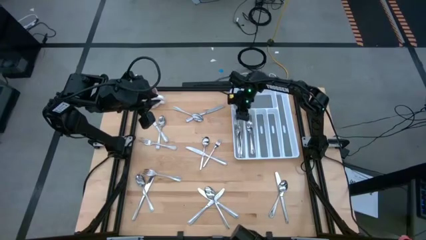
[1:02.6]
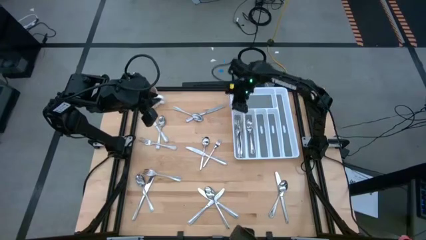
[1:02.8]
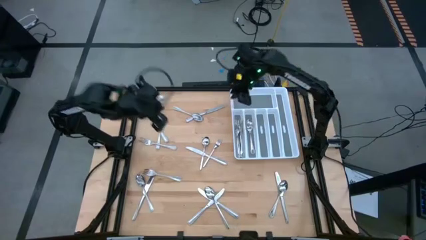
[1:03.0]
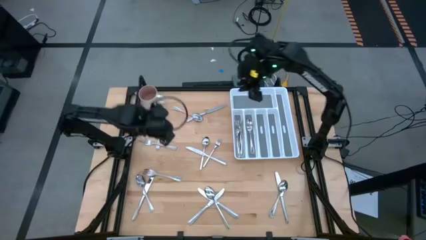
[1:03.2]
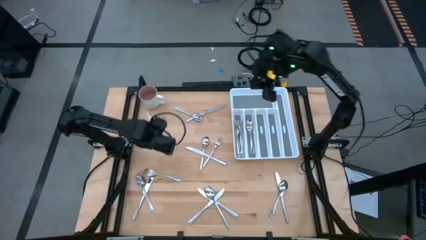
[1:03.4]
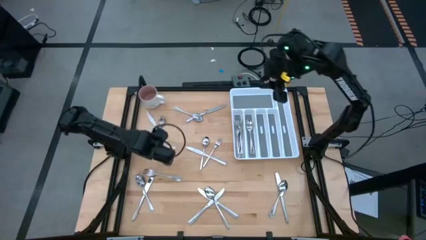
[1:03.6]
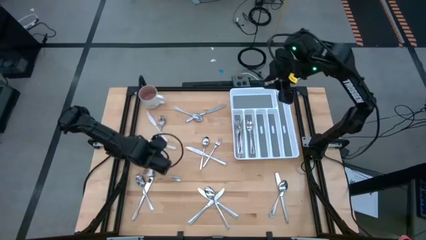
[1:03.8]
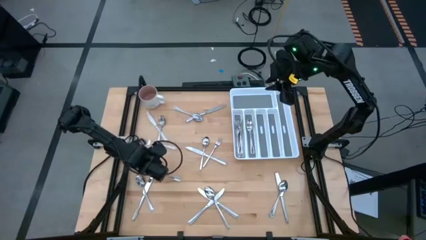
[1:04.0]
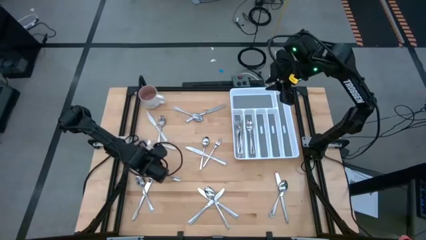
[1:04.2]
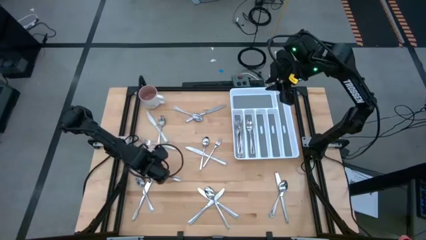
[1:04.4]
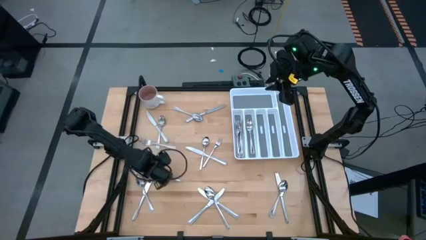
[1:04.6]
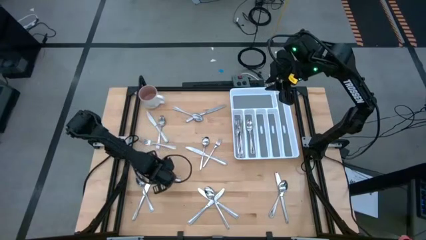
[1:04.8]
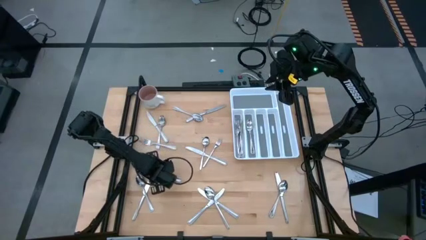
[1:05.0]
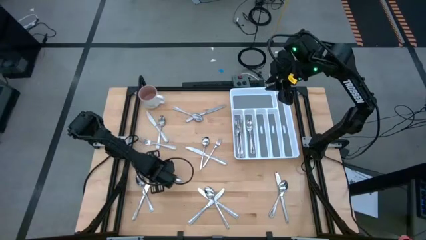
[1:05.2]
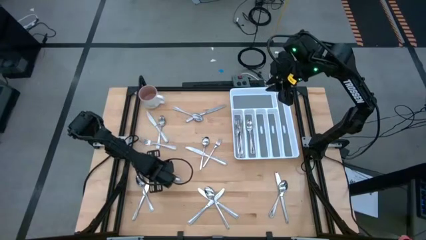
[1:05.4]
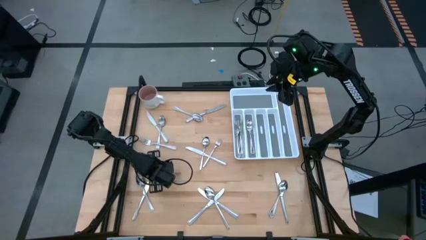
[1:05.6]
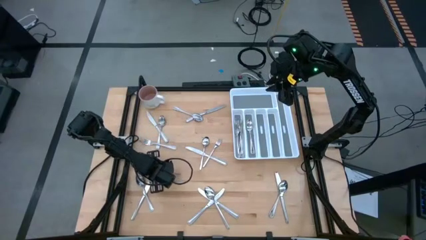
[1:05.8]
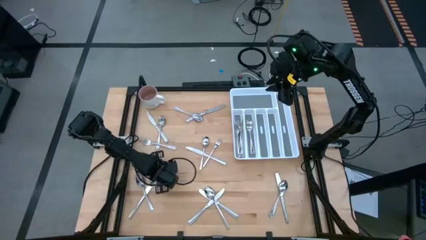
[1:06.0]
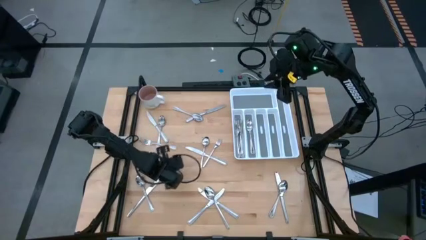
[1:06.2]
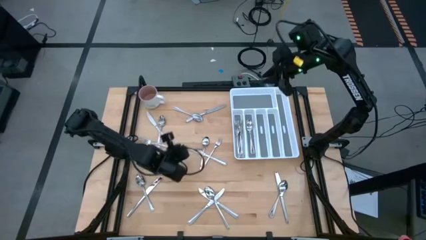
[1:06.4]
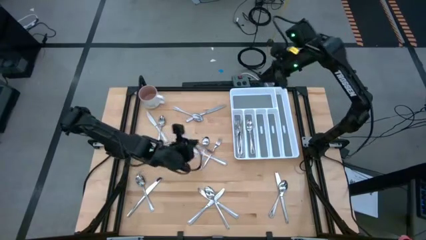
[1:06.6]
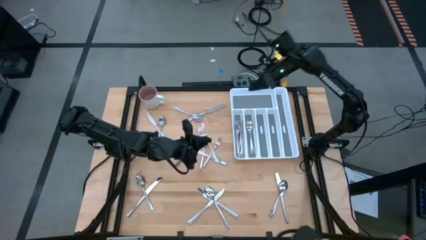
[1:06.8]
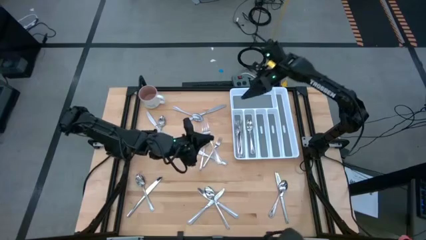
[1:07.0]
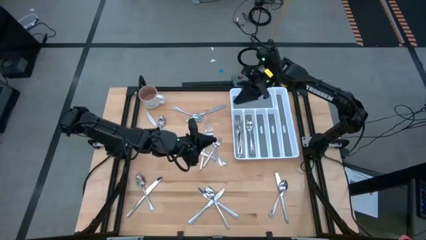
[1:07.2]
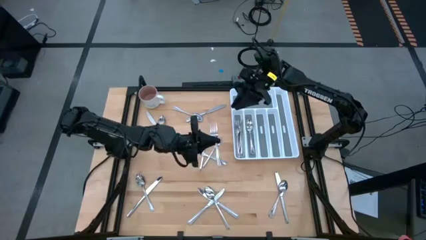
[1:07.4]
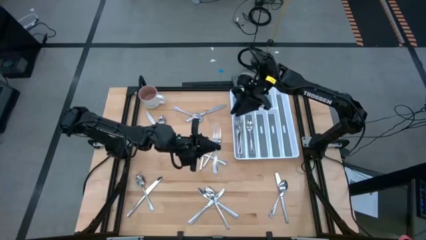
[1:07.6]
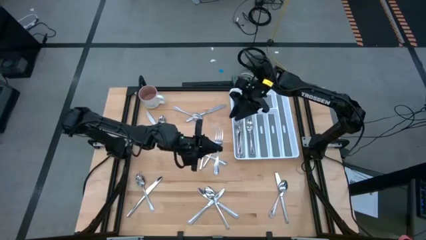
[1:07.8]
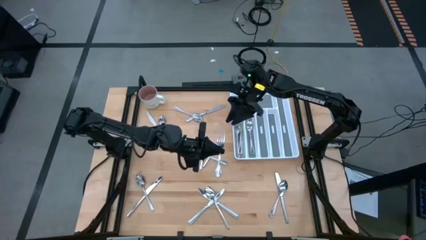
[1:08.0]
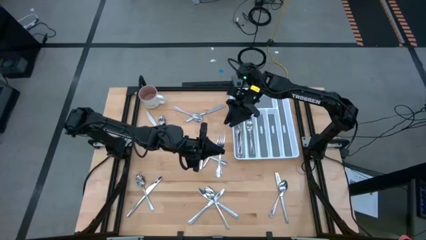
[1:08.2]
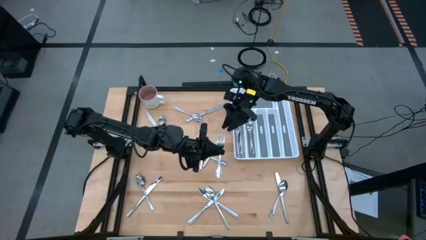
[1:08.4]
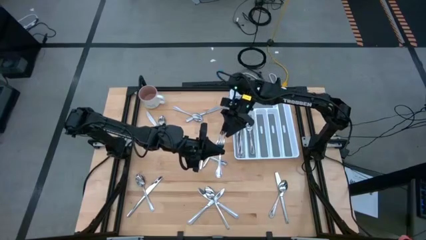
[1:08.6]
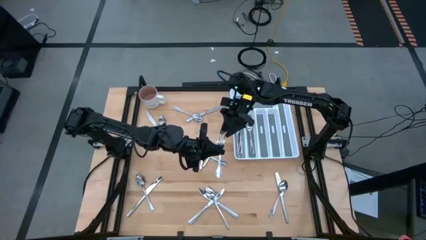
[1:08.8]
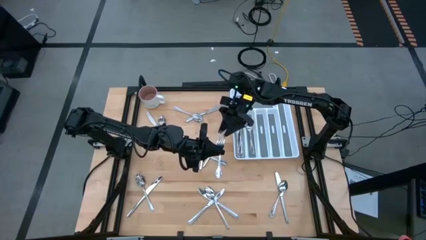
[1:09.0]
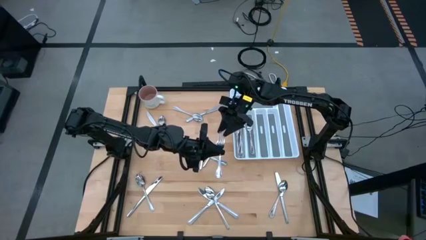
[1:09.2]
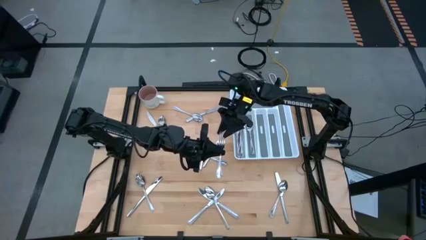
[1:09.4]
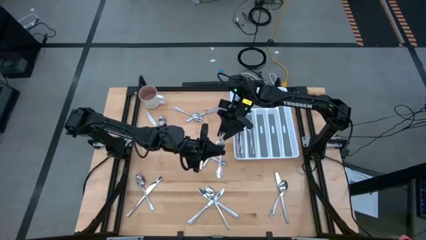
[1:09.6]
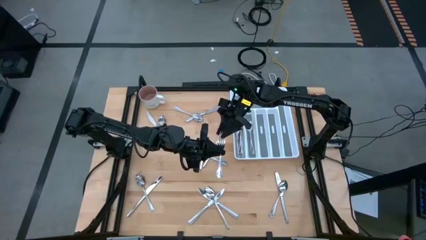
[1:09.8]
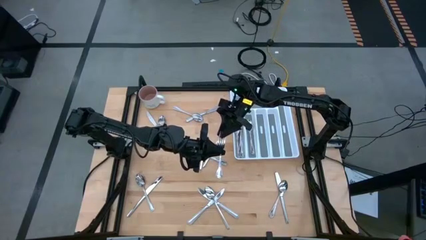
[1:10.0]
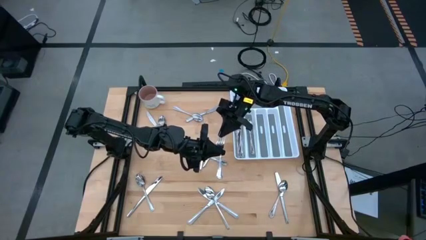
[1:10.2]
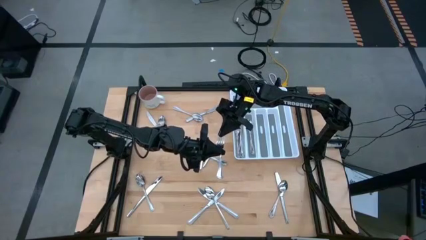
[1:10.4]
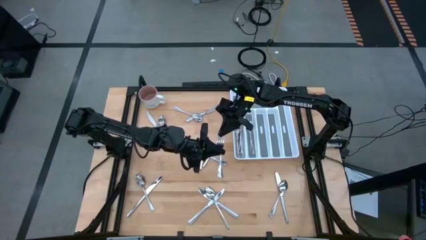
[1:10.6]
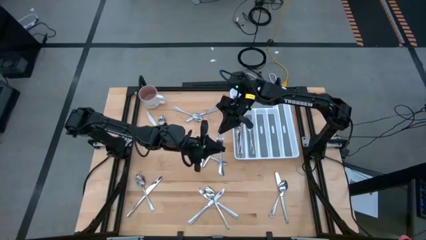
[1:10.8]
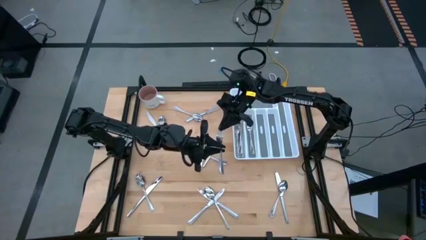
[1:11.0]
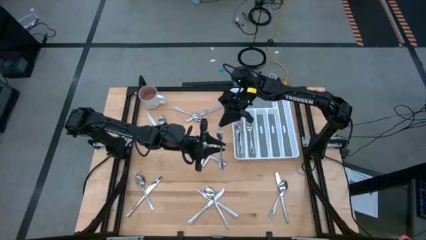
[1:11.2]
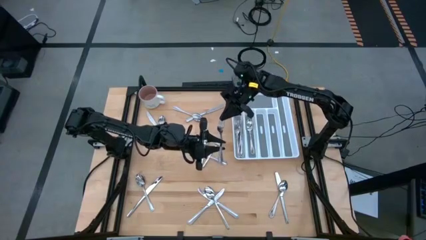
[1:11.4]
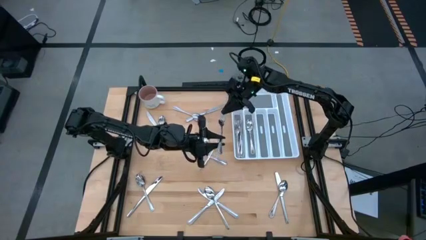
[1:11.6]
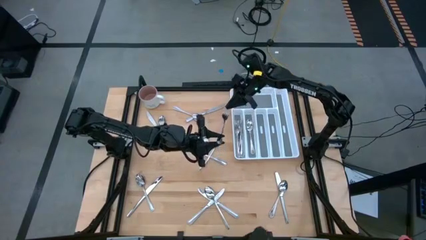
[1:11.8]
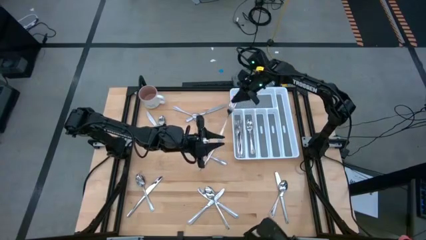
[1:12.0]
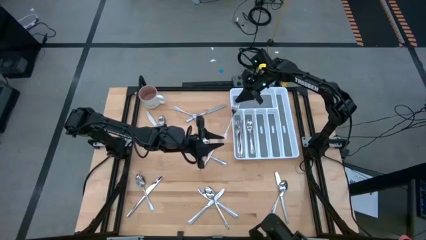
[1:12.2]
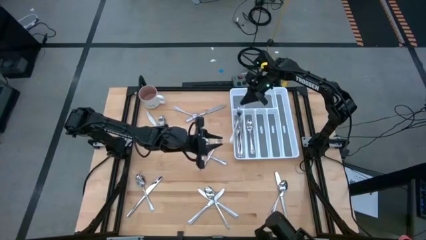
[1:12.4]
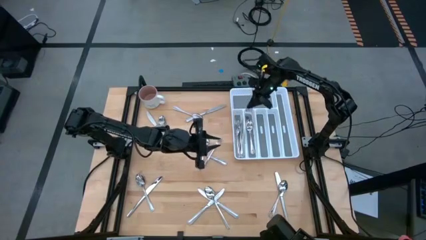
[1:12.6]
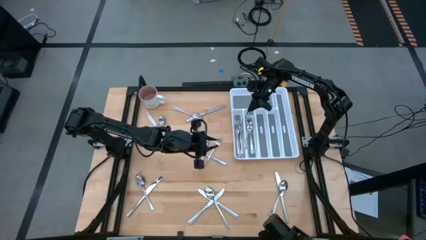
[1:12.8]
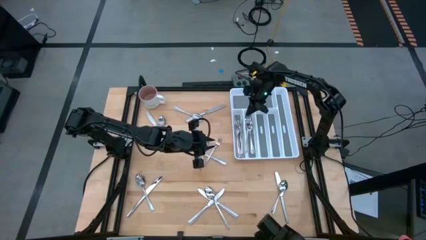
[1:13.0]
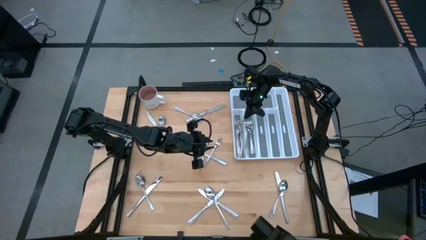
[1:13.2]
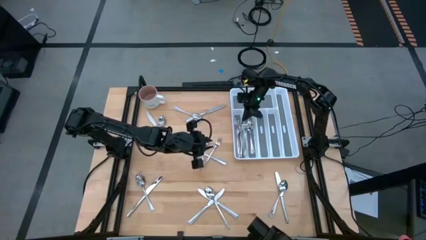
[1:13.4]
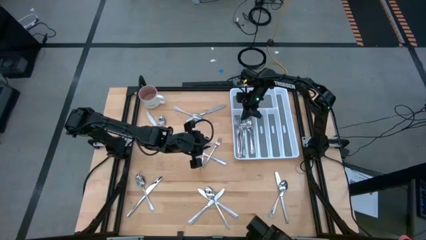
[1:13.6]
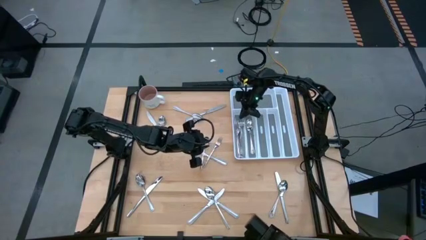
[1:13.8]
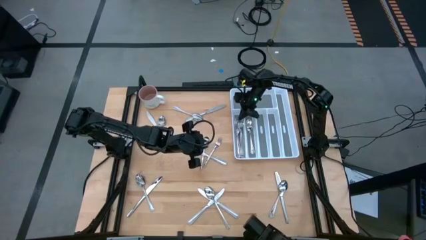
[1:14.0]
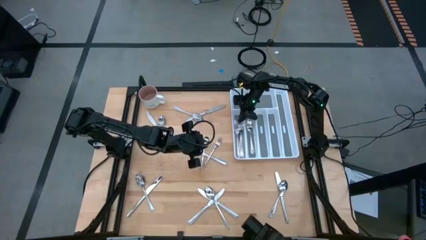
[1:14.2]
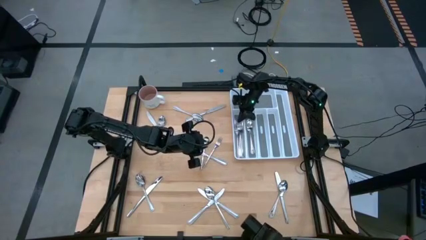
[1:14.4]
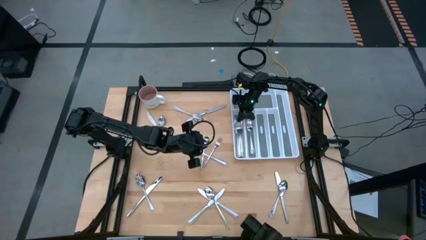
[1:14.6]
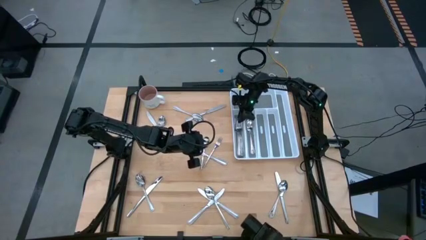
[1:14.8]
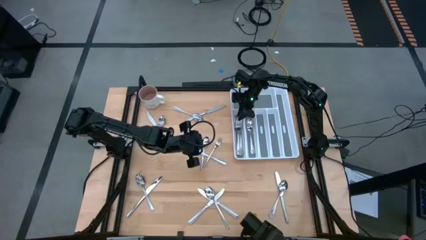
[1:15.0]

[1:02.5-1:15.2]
Task: Sort silverware
Put the silver fork into the silverware tray

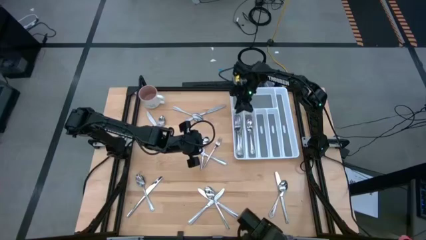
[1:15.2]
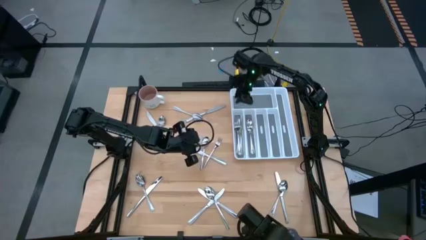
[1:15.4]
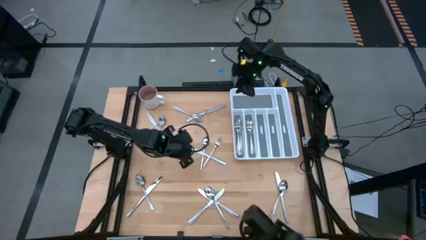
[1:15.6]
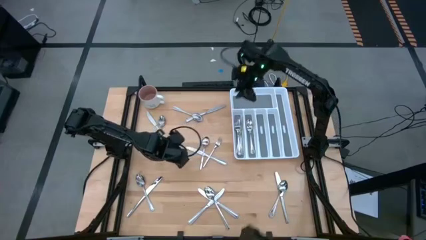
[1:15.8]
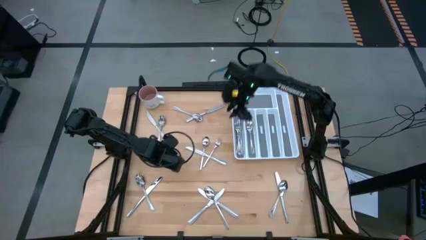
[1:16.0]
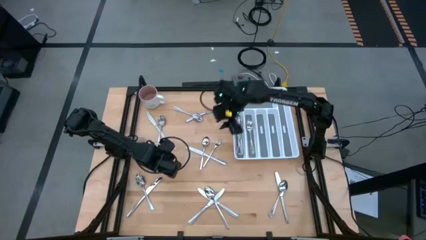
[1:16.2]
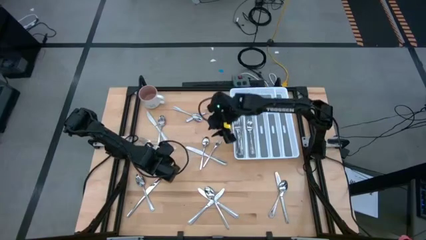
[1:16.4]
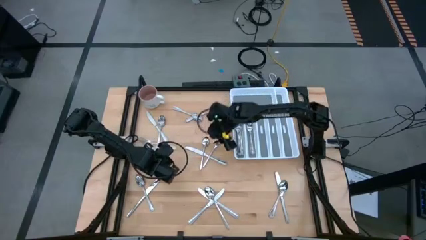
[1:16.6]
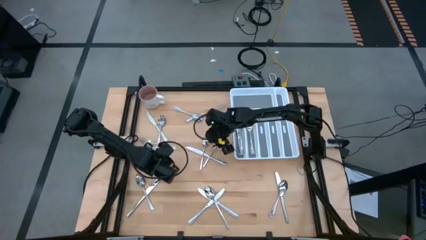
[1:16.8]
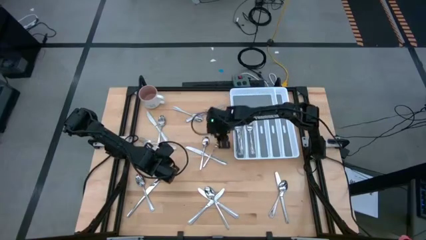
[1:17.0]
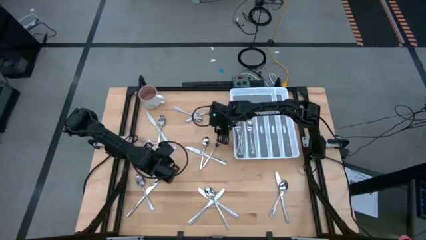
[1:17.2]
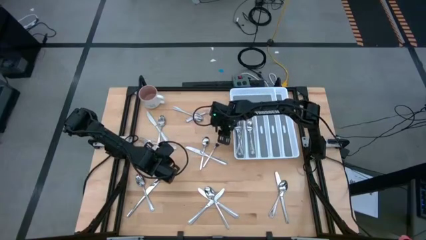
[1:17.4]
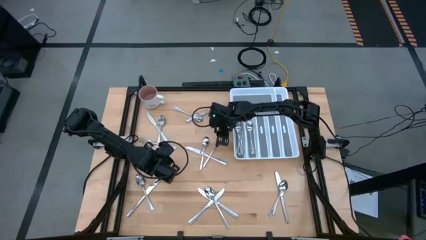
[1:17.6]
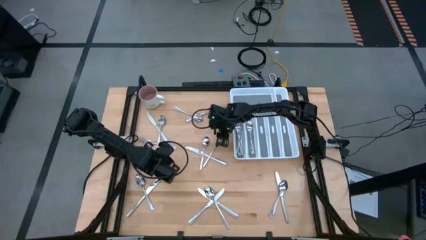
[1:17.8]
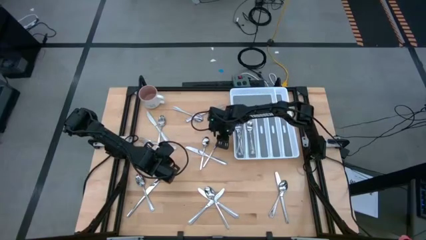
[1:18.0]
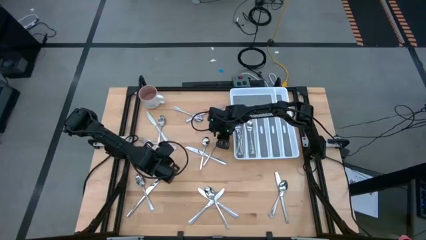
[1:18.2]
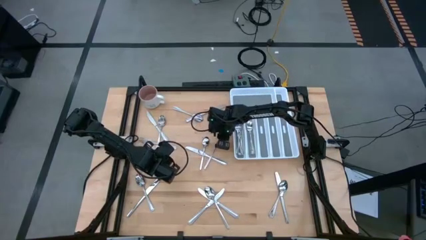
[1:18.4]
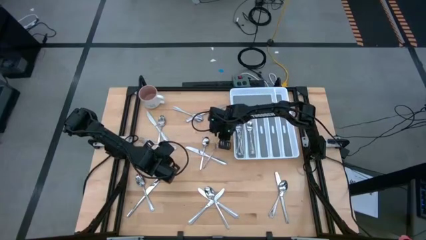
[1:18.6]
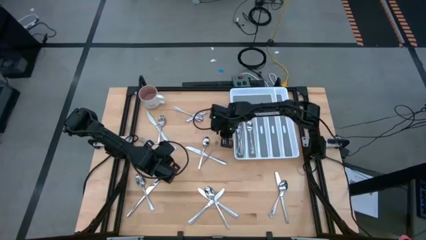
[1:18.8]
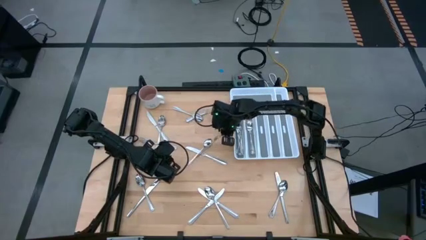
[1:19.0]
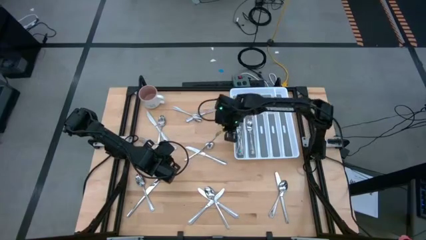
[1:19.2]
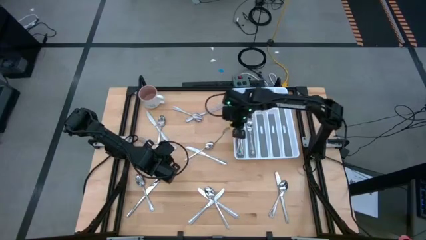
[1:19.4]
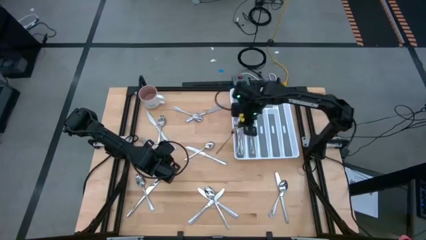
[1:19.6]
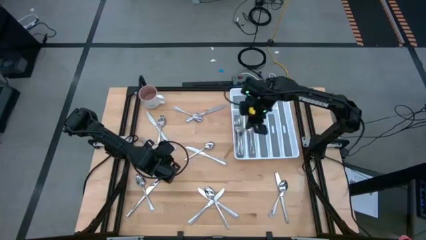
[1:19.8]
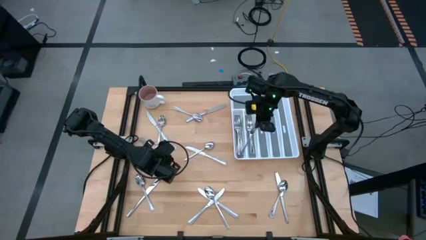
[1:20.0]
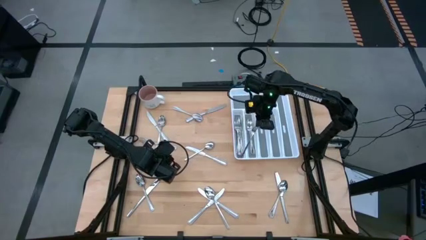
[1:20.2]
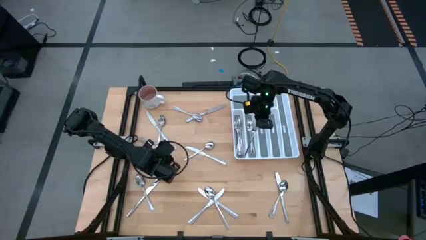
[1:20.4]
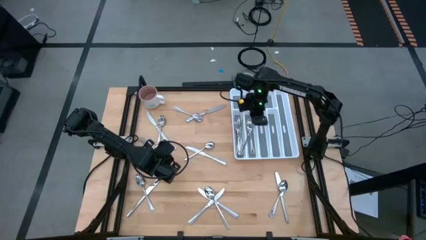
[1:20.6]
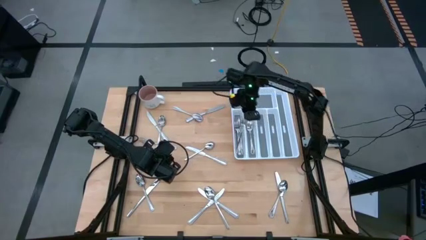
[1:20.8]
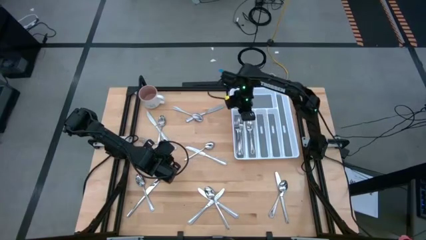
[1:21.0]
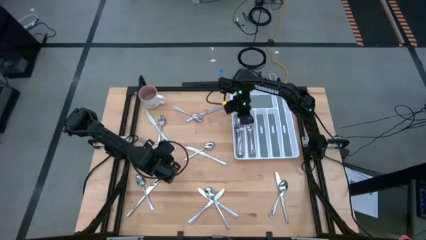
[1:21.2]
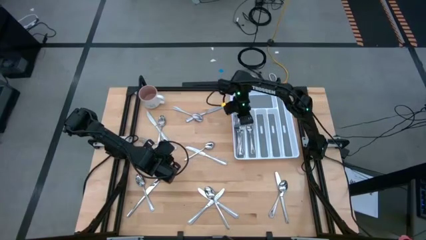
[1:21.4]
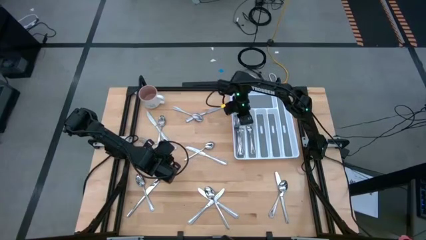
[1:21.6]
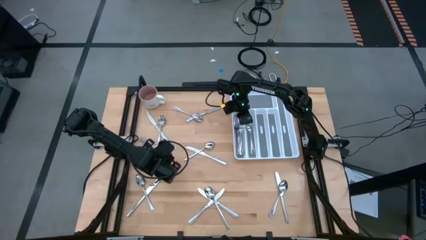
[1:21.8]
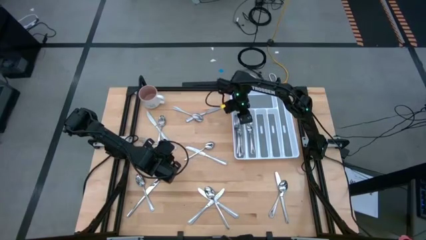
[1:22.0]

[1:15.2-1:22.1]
Put the silver fork into the silverware tray
